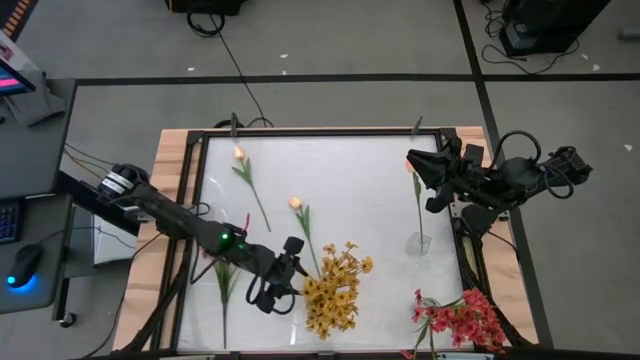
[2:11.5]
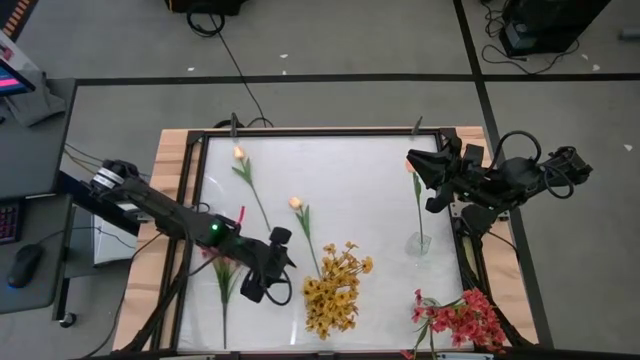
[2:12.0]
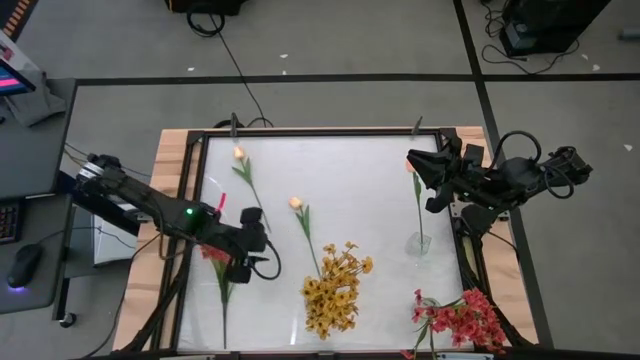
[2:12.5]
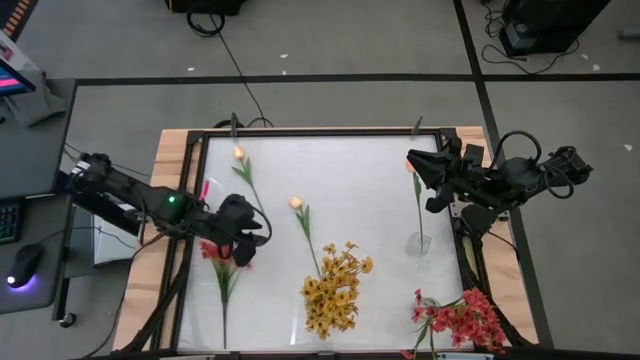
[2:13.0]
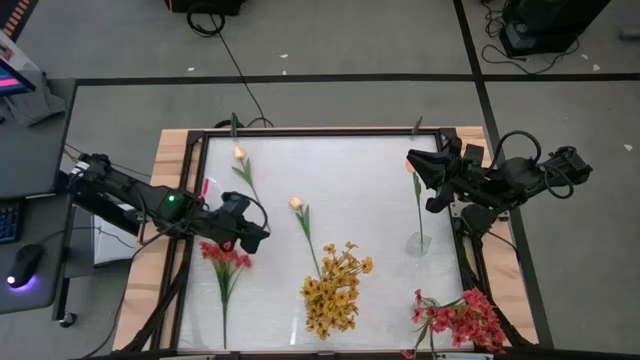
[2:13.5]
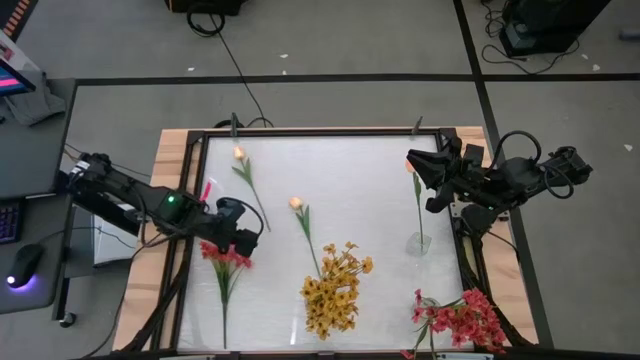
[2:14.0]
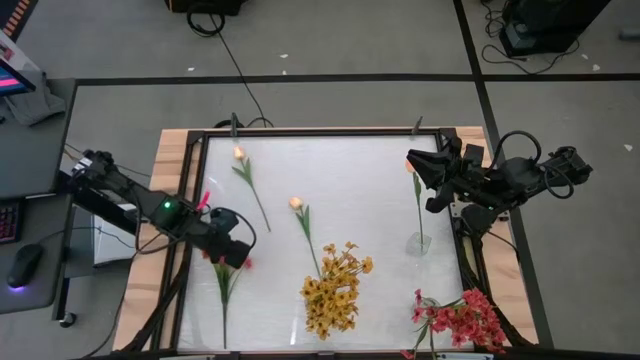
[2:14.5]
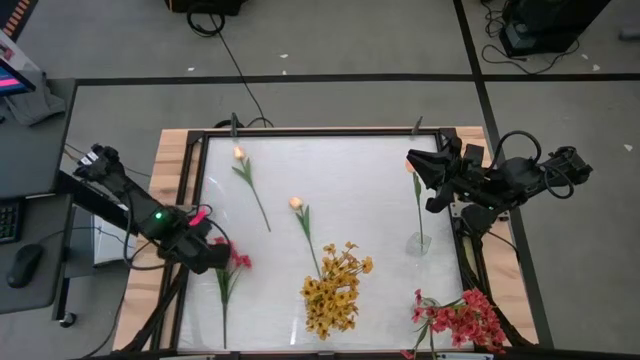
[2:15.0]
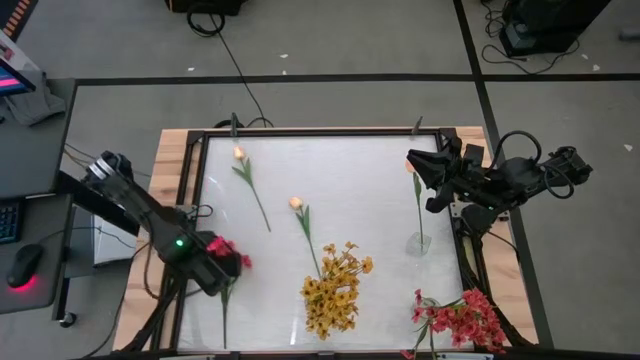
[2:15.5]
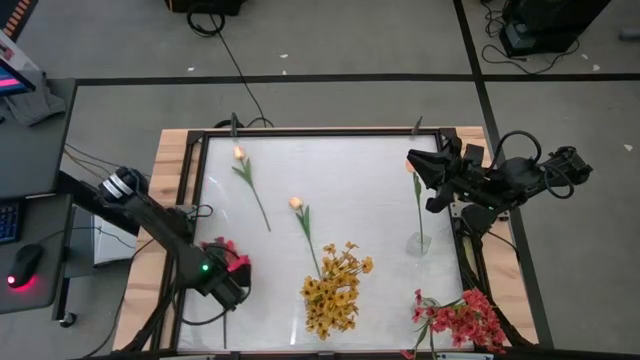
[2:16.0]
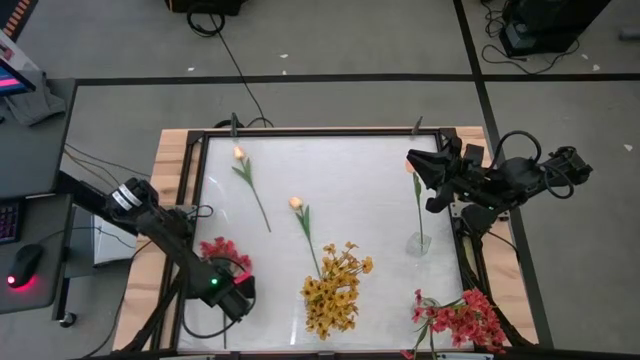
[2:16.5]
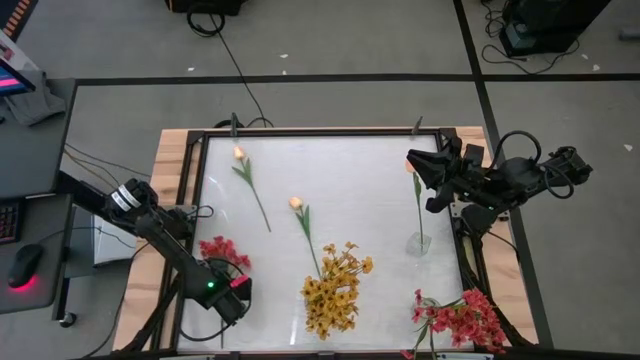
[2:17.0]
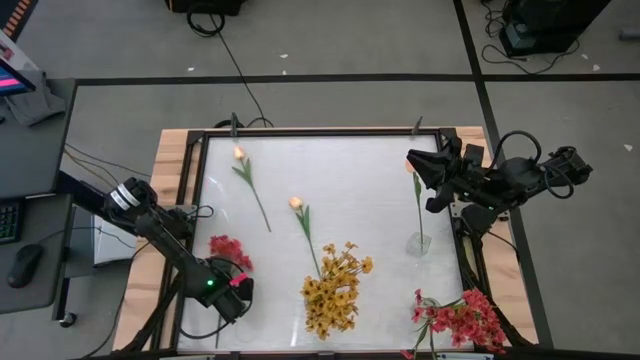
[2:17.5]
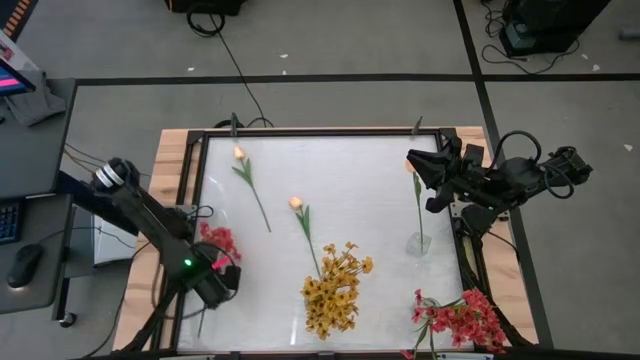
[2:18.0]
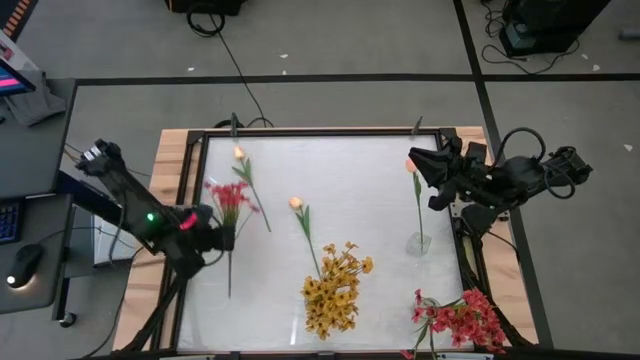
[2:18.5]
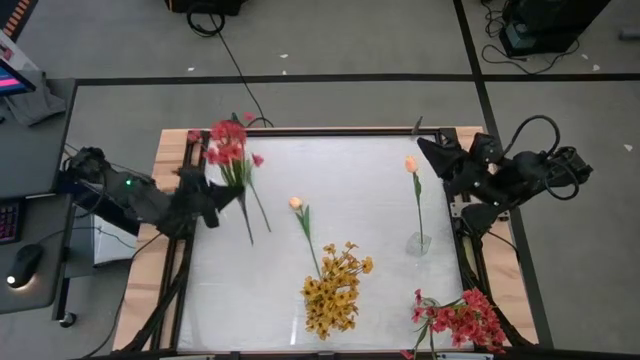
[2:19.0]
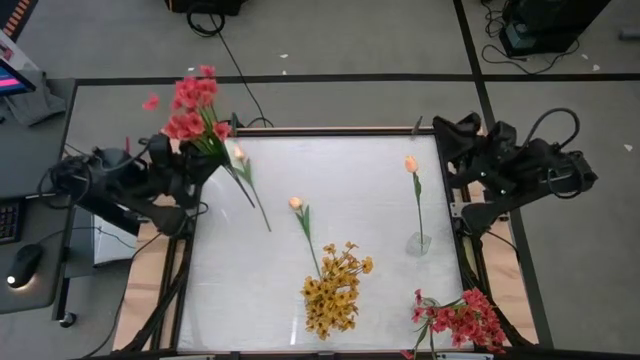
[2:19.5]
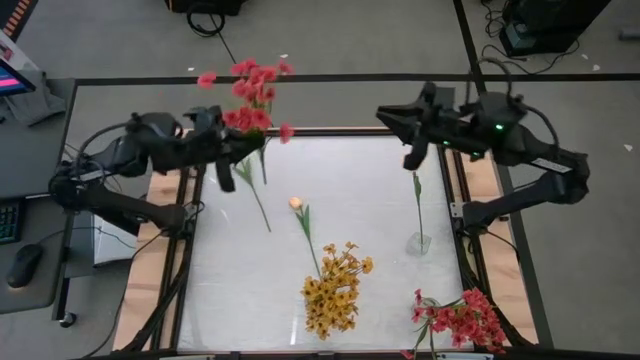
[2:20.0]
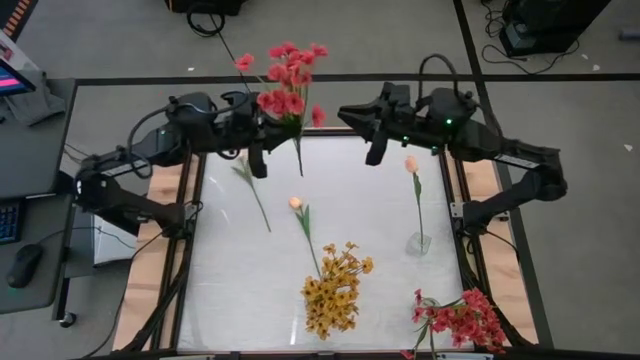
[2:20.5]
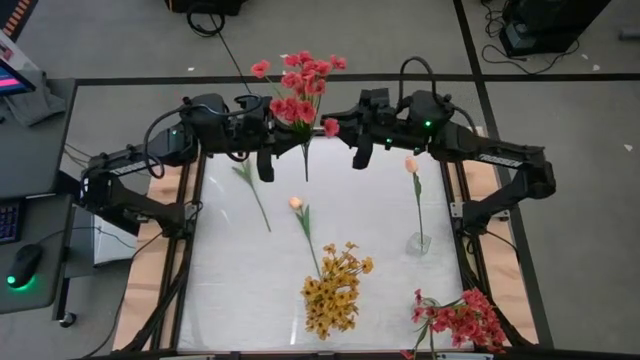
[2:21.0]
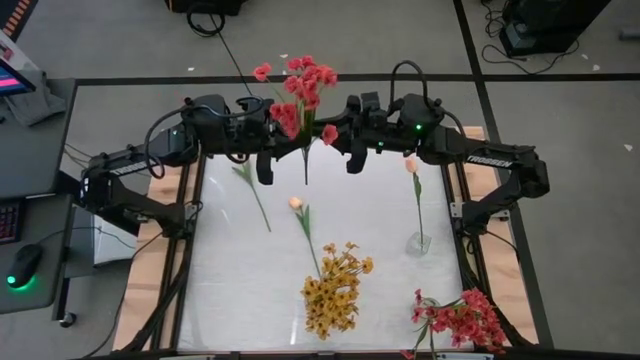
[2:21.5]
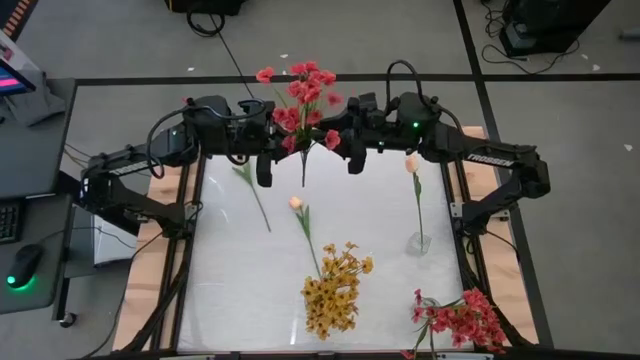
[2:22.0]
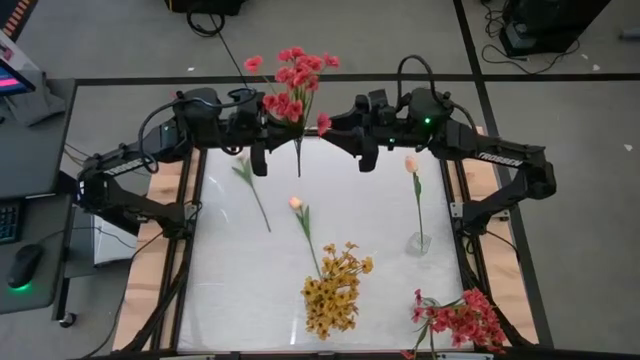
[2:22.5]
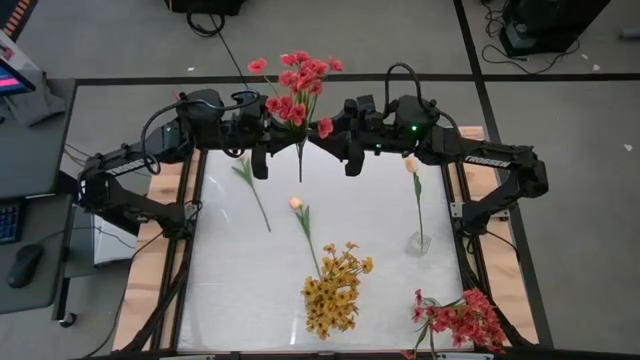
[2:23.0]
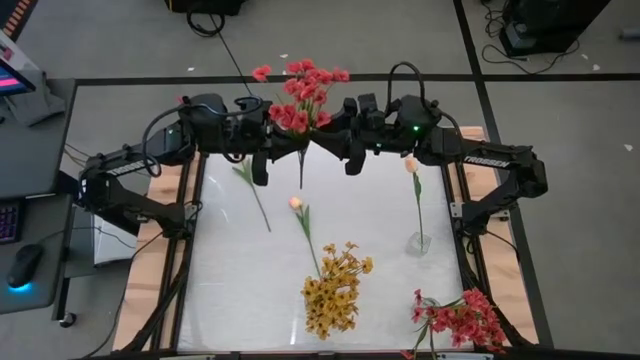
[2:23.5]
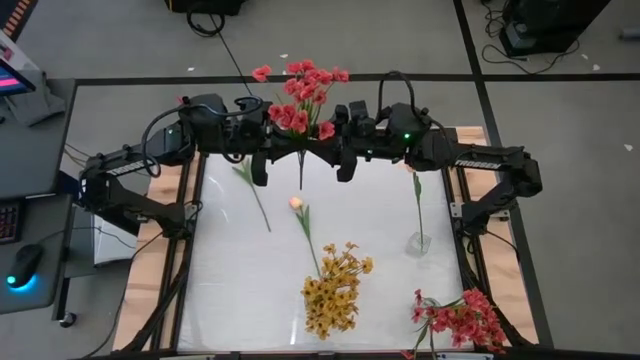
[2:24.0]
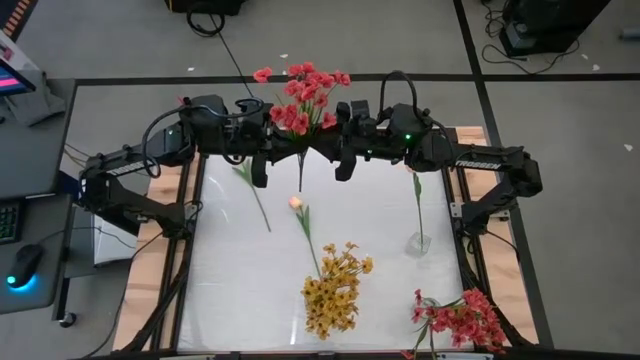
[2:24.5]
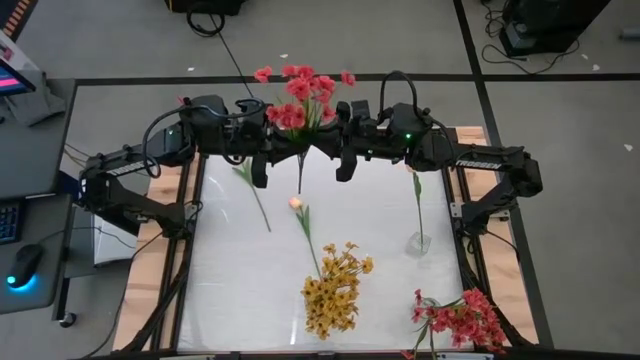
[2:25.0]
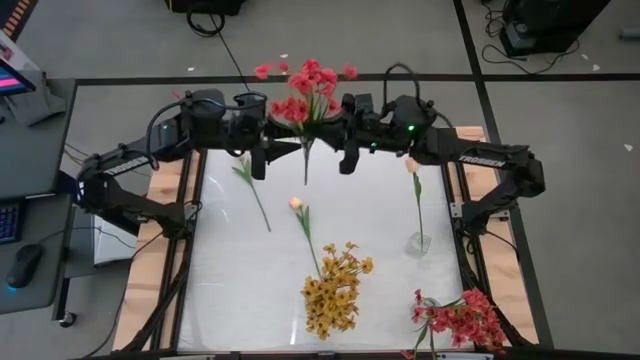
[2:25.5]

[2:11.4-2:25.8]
Task: Sort flowers into vase by color
Put the pink flowers into the bottom right transparent vase

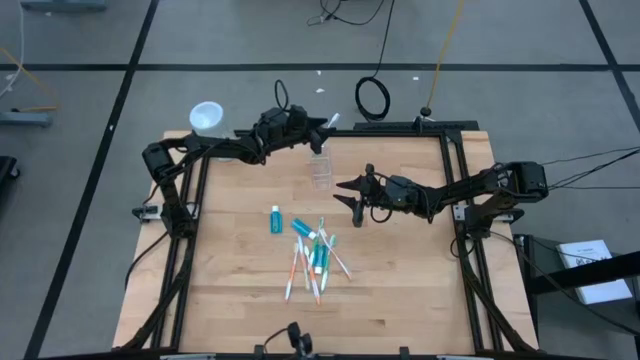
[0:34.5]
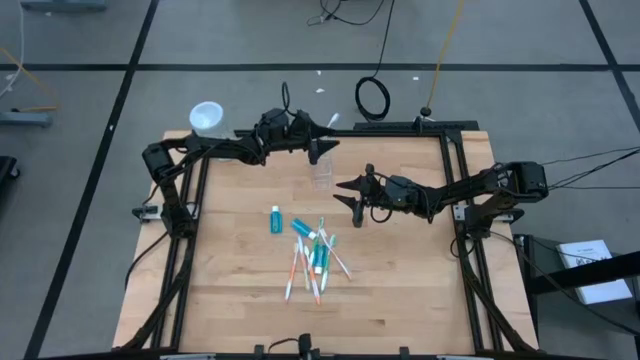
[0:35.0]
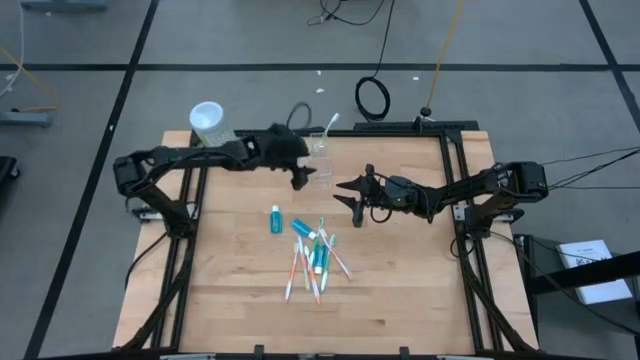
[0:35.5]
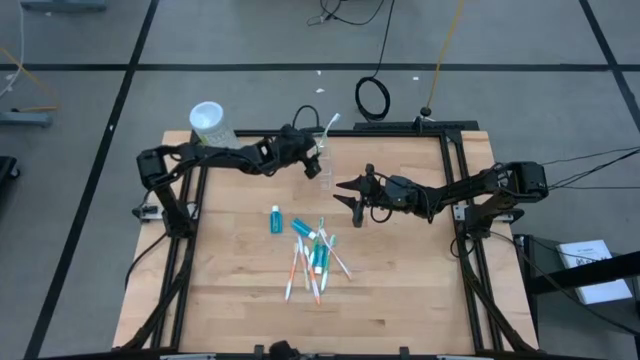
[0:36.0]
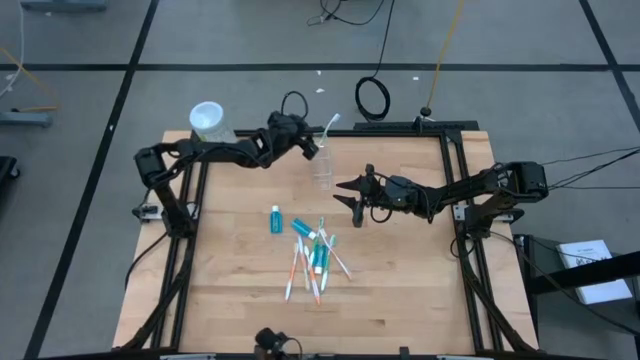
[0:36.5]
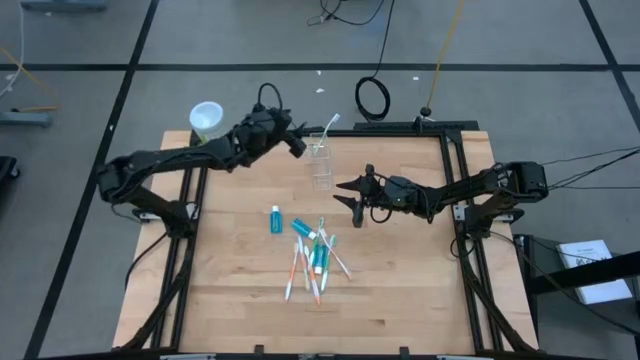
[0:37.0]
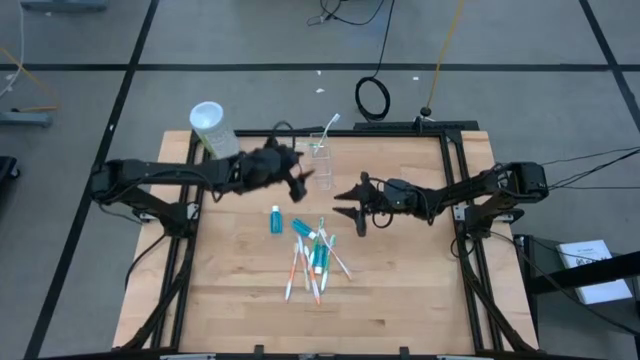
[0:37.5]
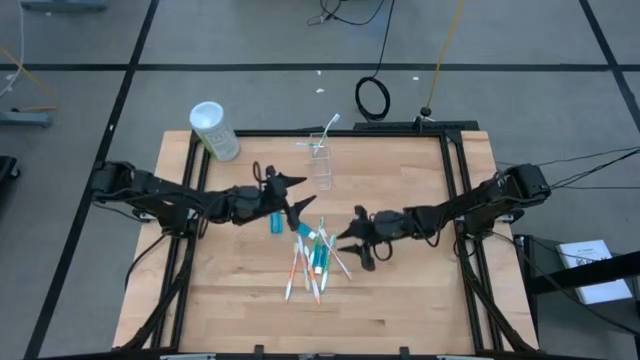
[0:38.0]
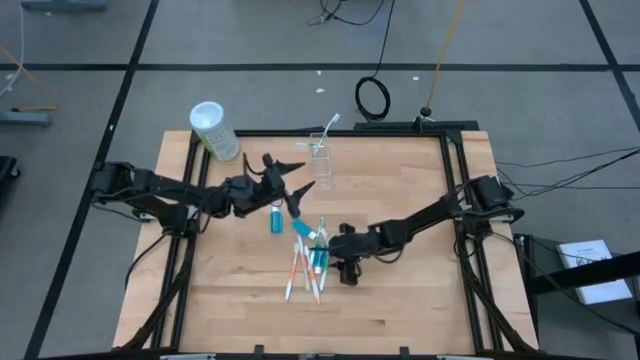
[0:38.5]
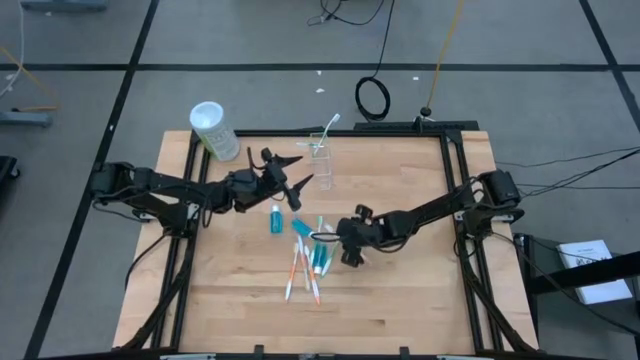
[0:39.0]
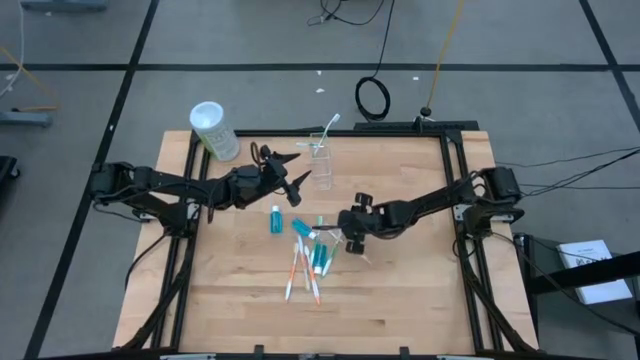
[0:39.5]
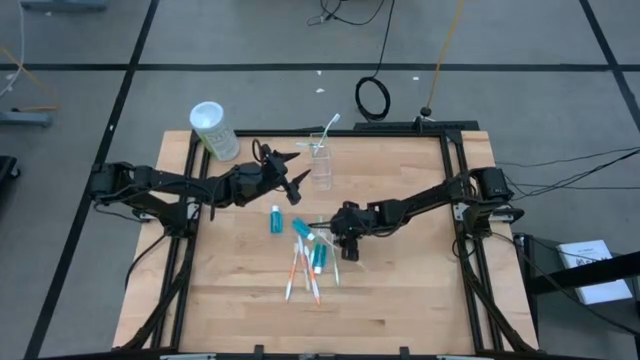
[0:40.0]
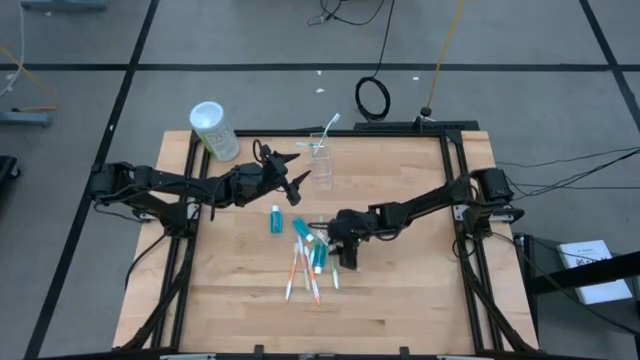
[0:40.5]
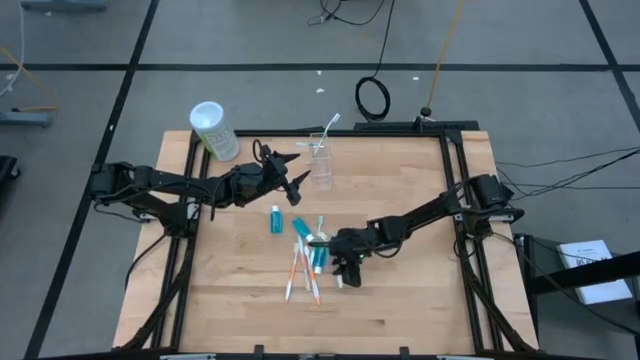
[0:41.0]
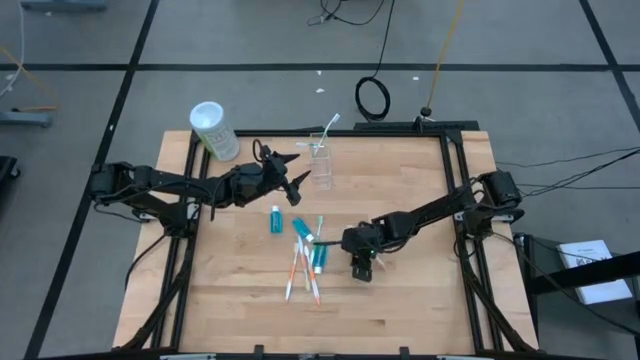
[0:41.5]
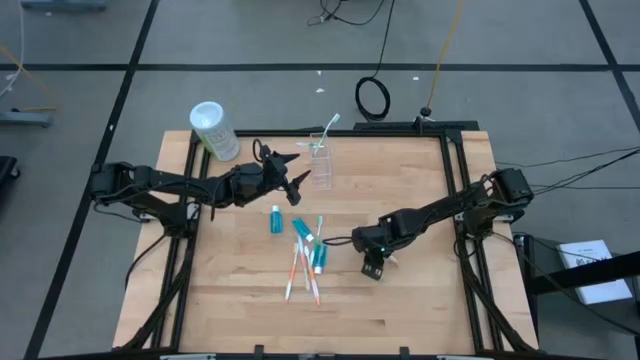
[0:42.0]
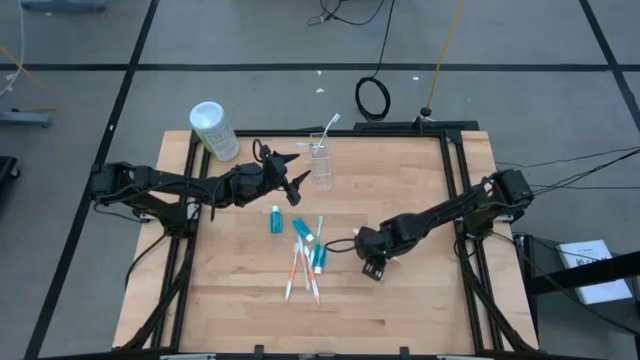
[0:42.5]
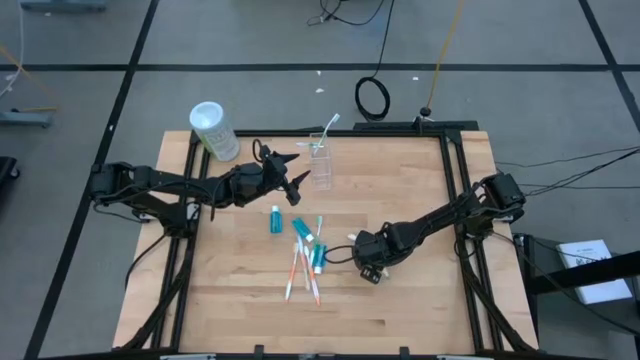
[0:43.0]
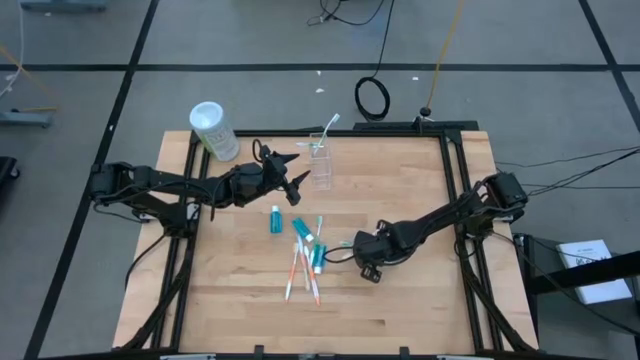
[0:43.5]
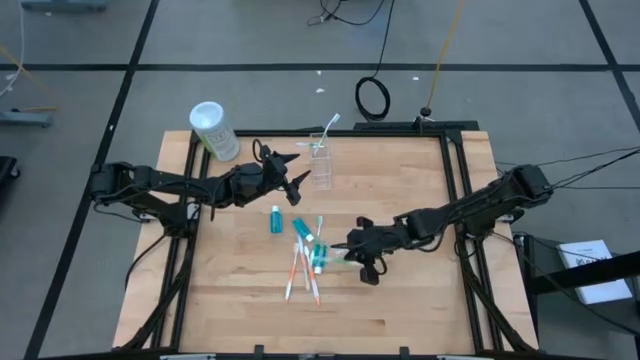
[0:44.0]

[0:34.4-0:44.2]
Task: Pick & Place toothbrushing station
Put the green toothbrush into the transparent organizer
